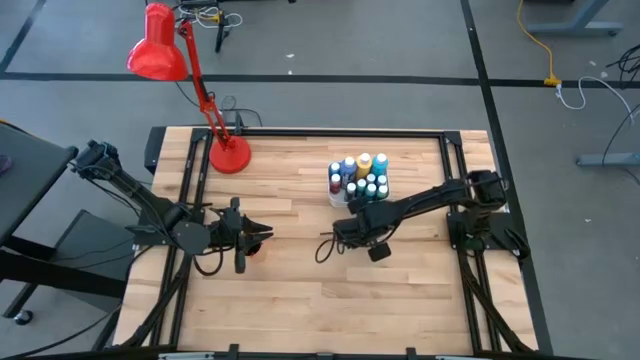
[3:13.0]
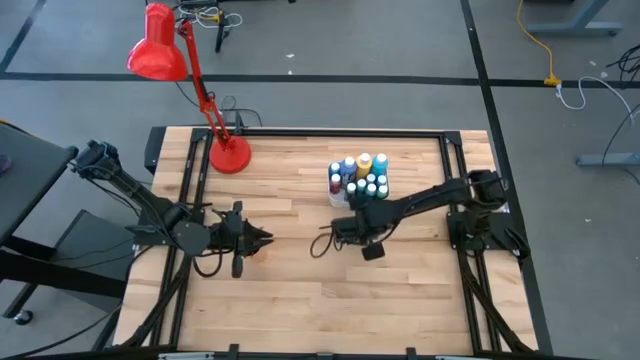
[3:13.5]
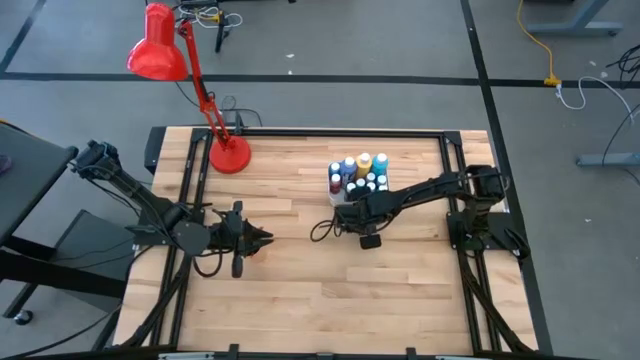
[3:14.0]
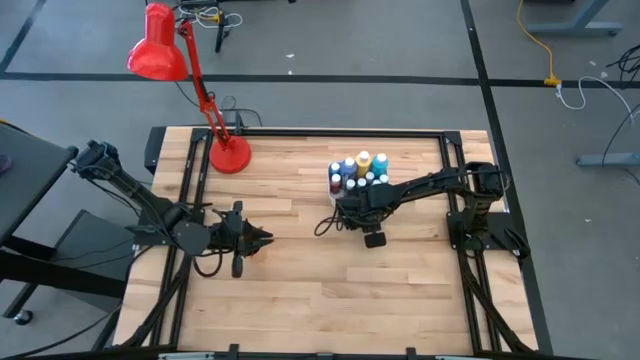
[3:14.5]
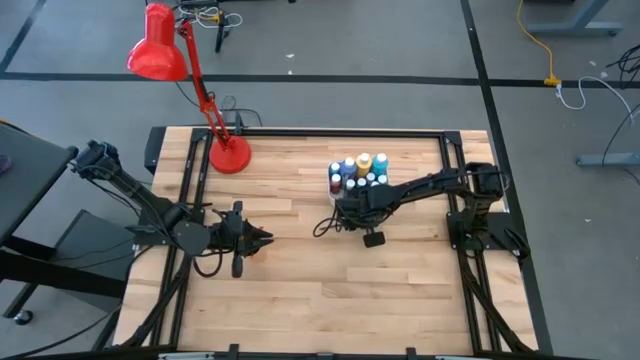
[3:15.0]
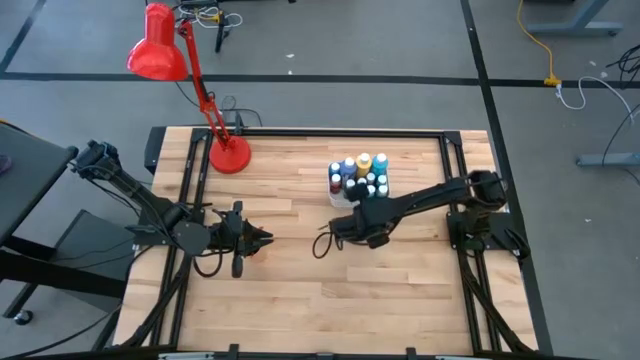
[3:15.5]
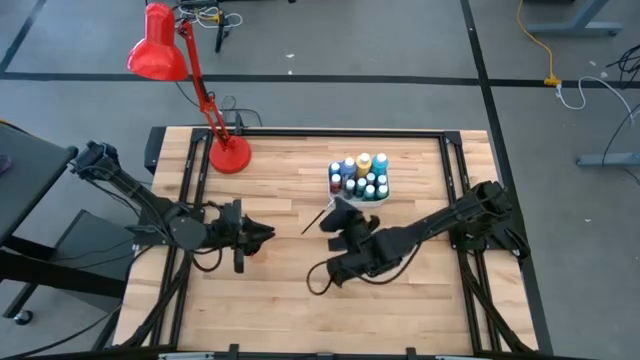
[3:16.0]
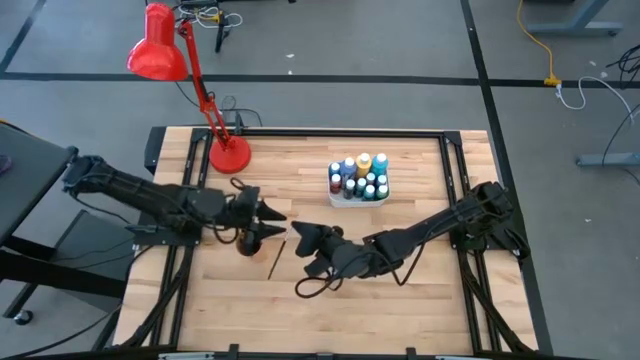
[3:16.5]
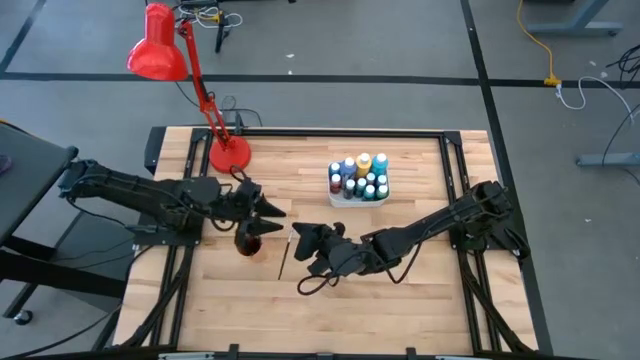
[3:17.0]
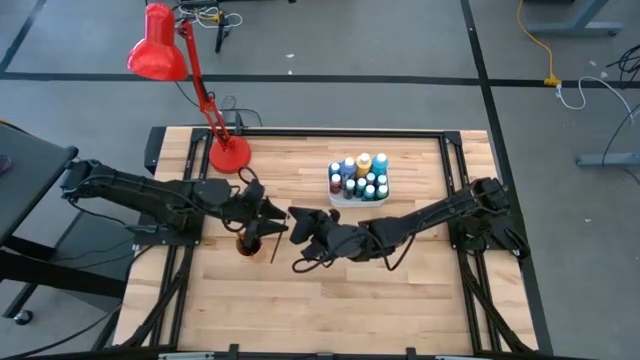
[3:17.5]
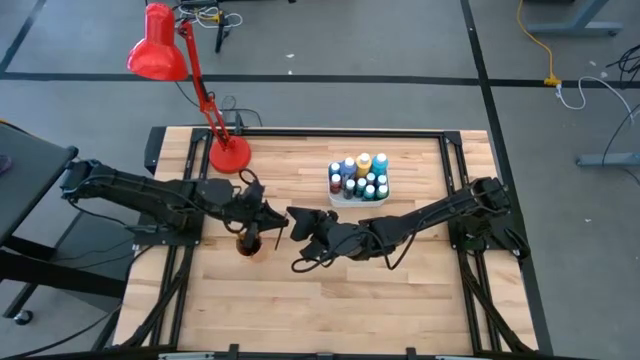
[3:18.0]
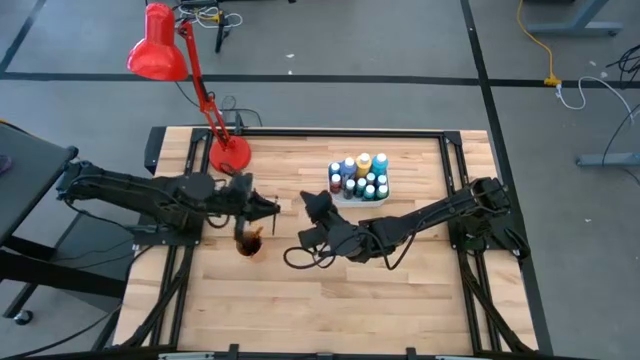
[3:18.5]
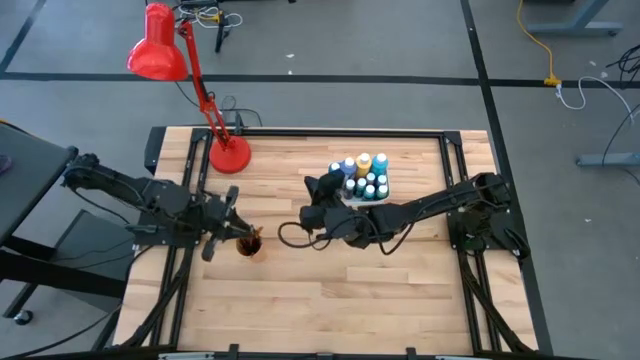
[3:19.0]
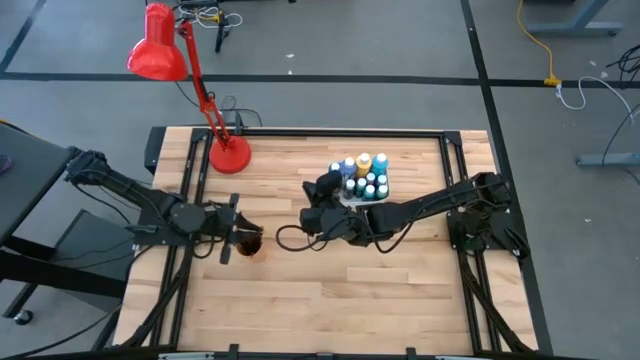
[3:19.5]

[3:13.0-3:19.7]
Task: Pick & Place Paint Supplies
Put the silver paint brush into the orange cup

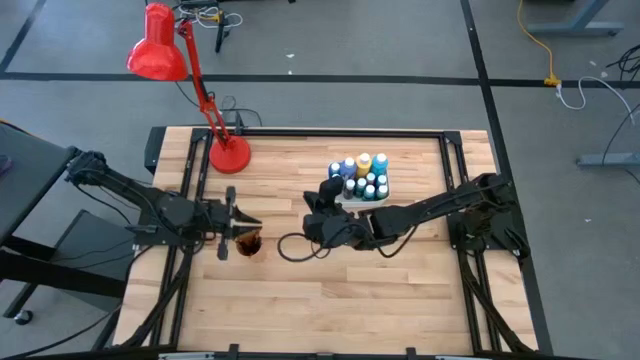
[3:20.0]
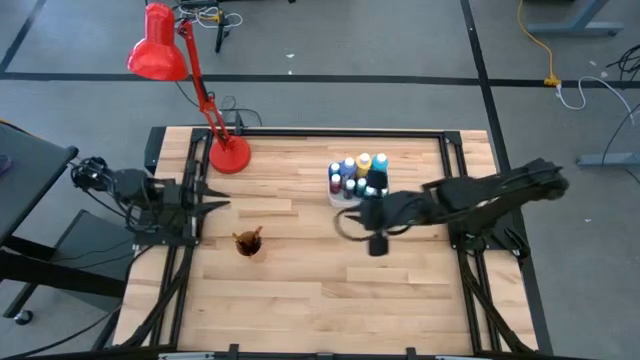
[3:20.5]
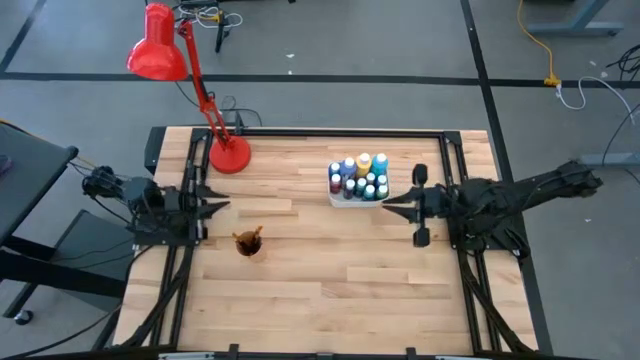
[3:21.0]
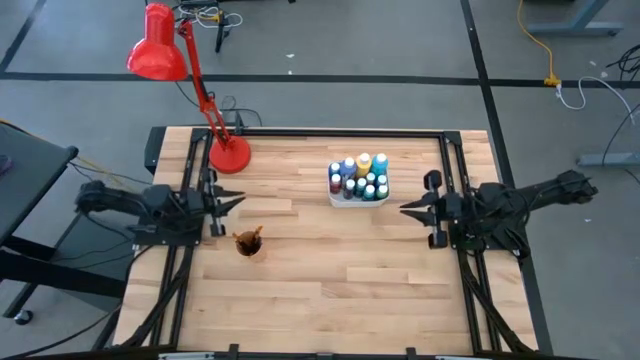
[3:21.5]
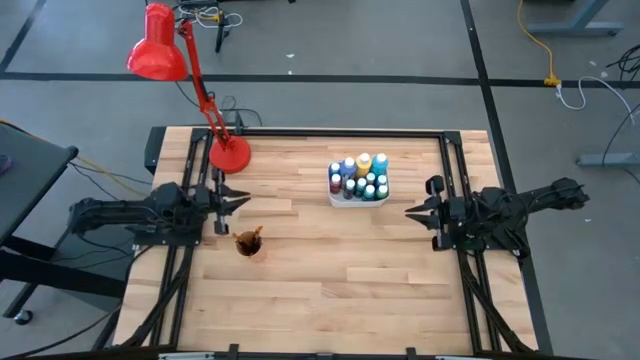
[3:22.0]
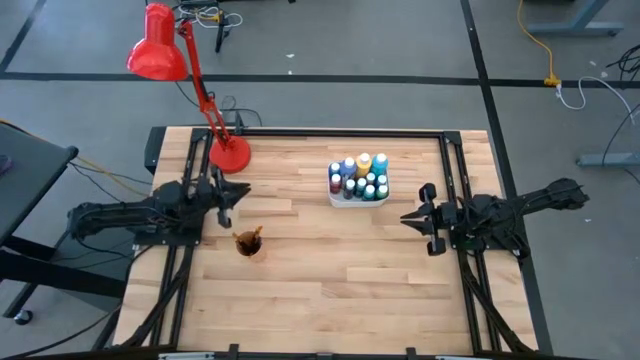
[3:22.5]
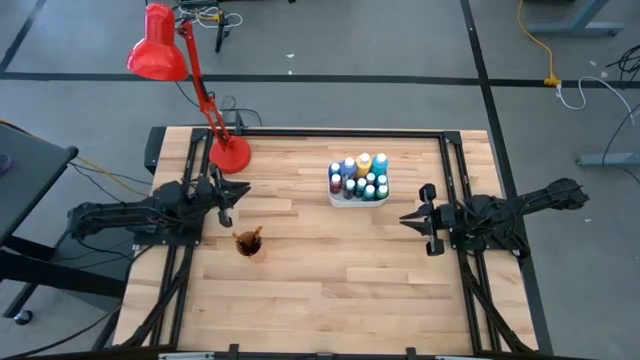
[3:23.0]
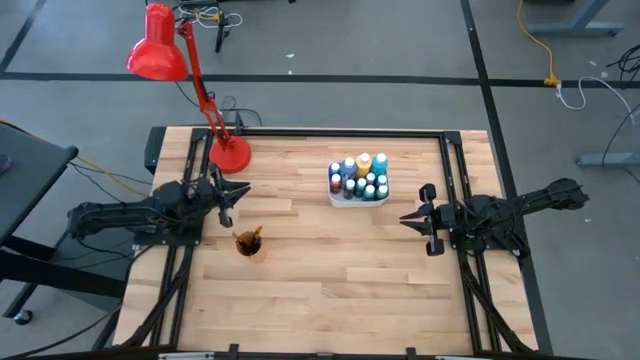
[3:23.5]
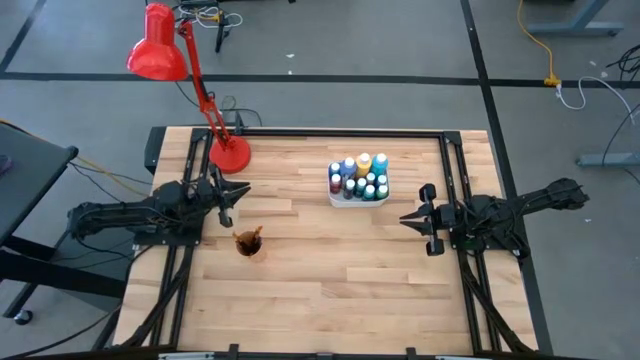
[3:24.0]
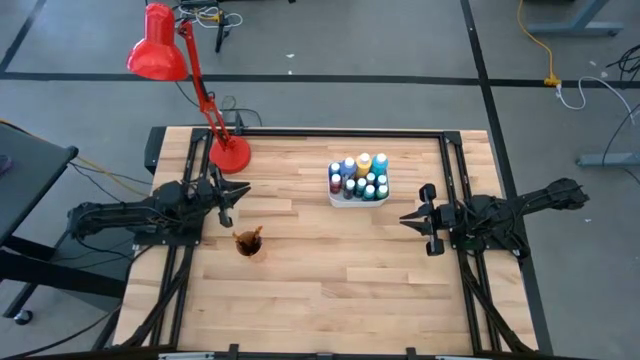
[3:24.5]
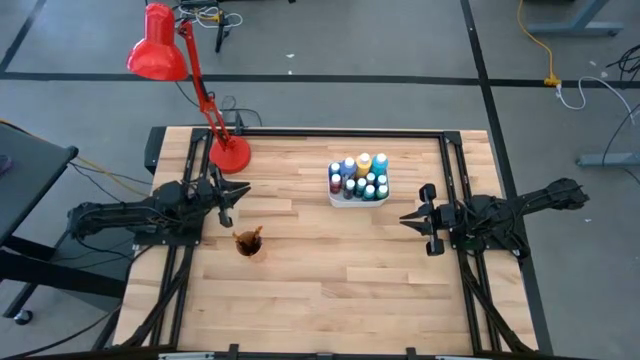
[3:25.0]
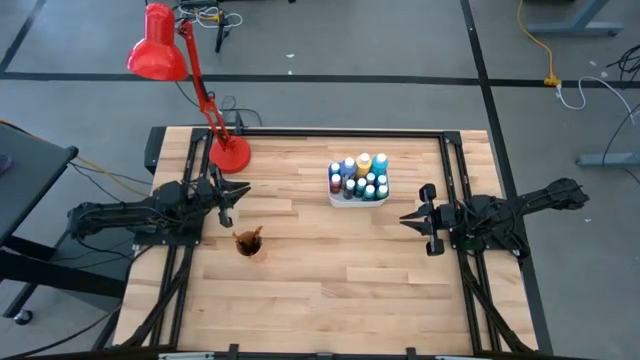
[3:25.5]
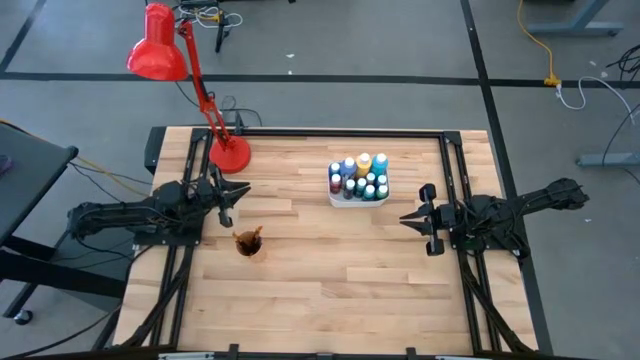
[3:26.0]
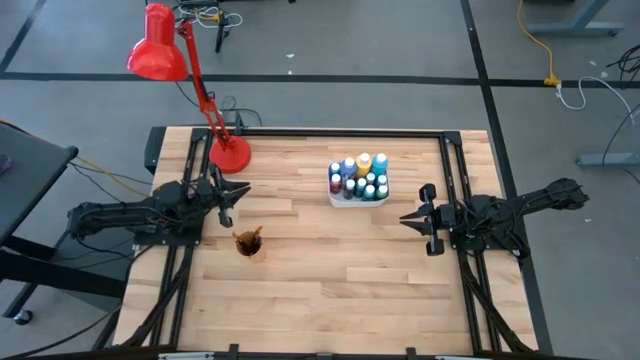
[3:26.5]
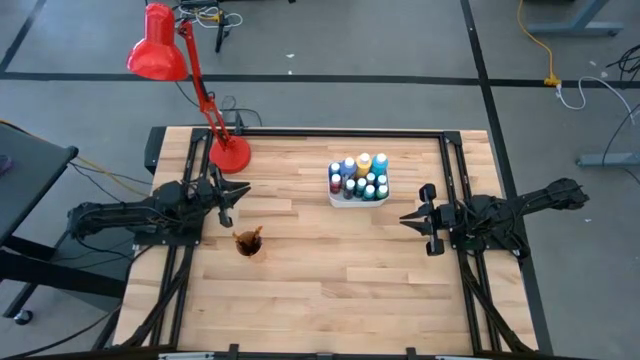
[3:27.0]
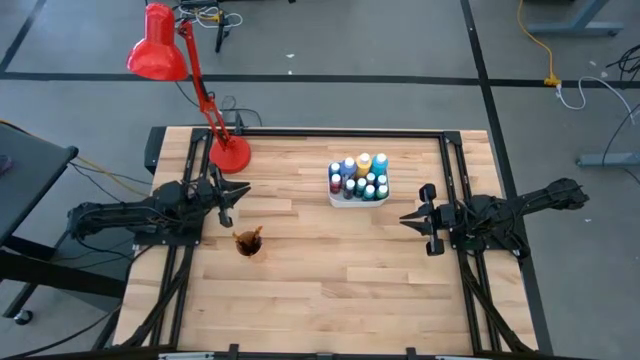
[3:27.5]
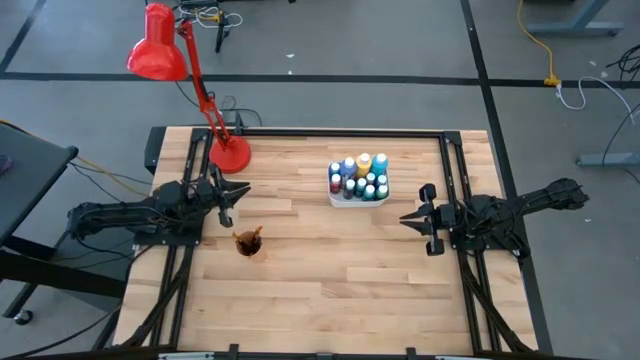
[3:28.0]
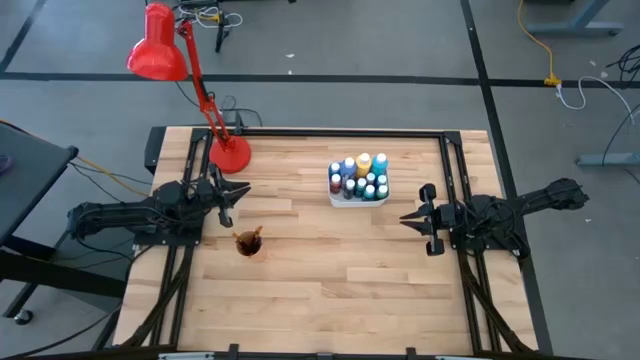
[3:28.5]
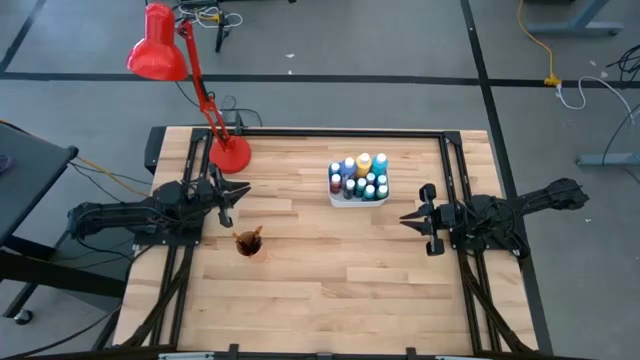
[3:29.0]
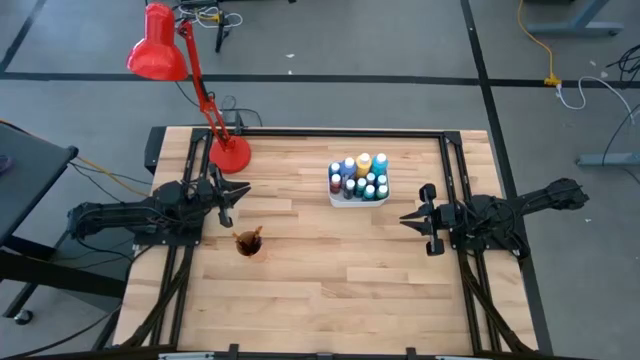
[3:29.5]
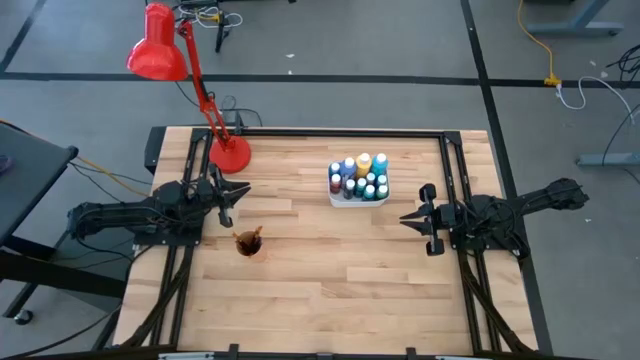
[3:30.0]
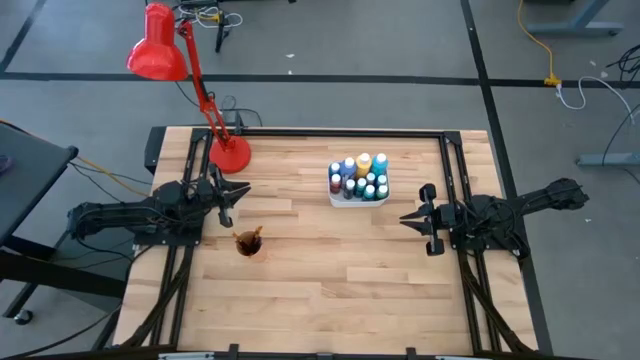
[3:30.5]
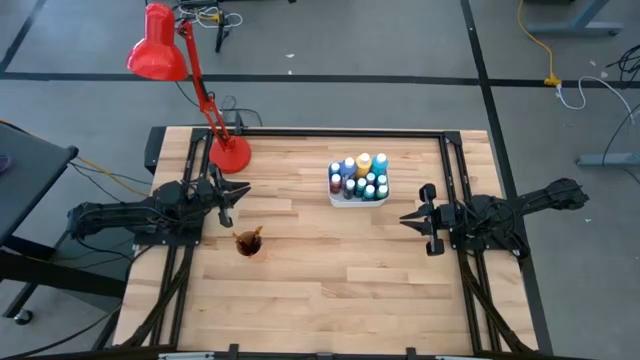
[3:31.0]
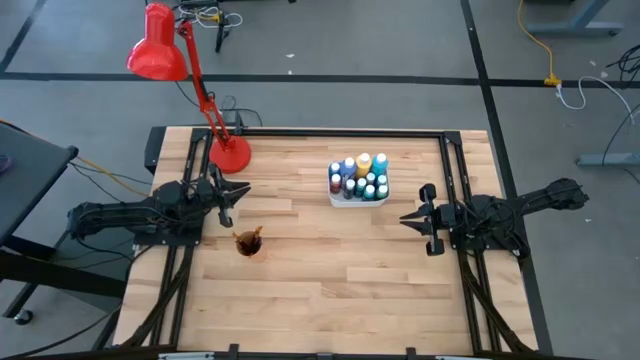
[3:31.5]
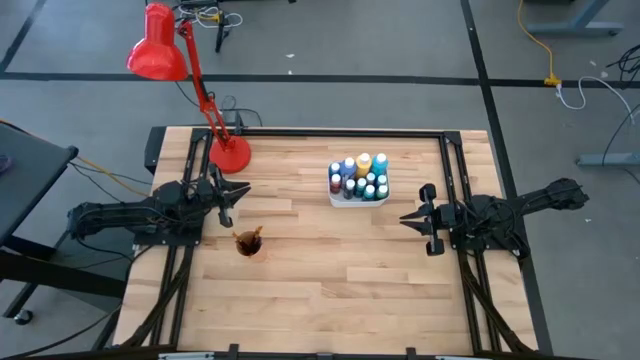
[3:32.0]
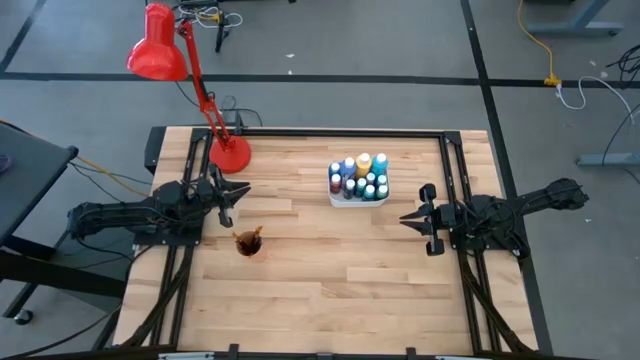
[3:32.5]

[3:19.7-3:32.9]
Return to Home Position

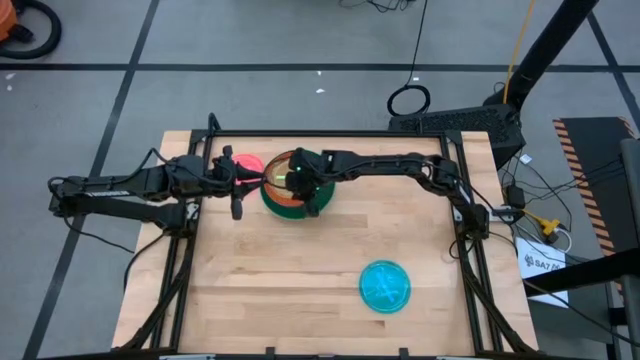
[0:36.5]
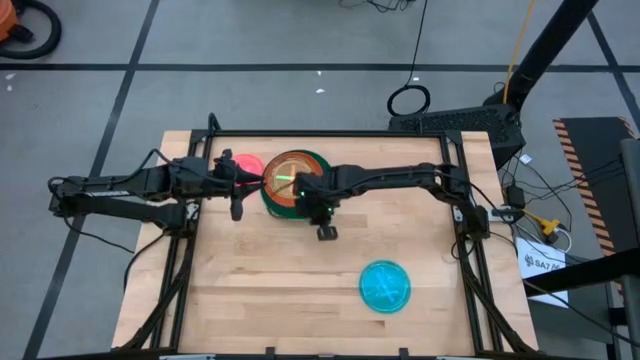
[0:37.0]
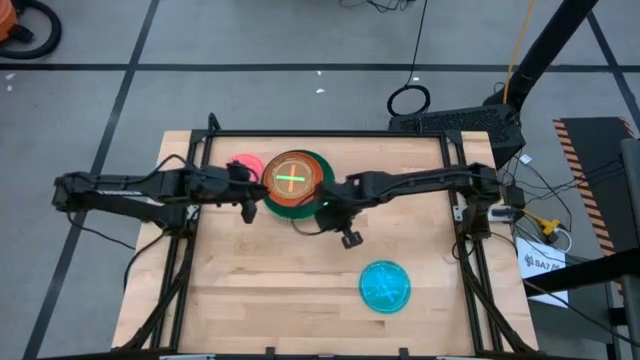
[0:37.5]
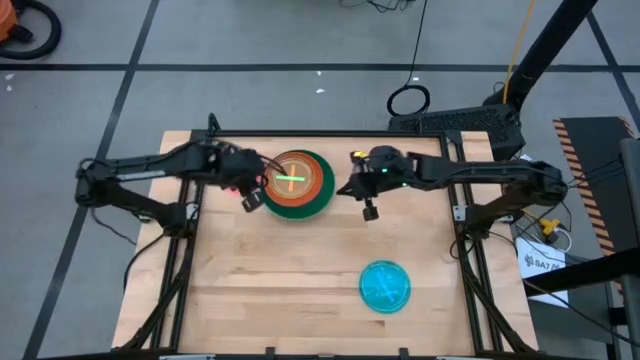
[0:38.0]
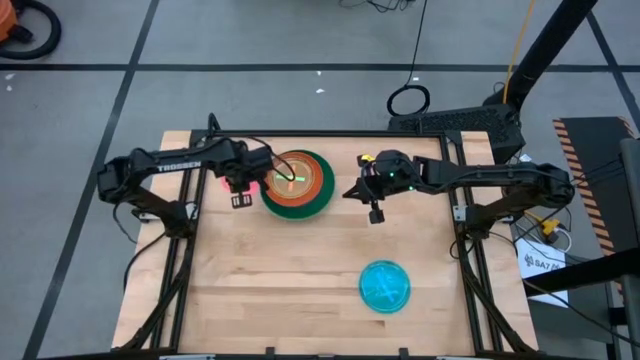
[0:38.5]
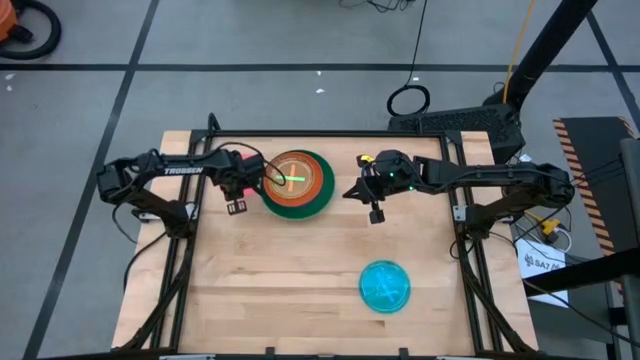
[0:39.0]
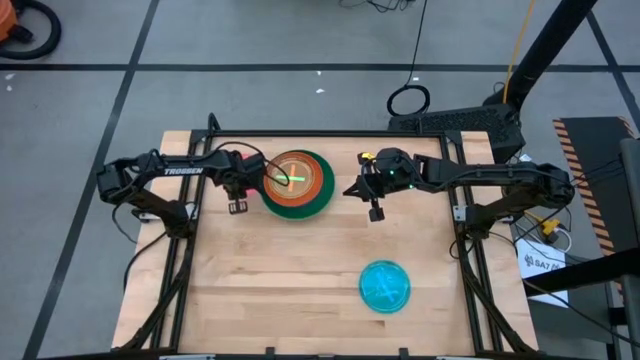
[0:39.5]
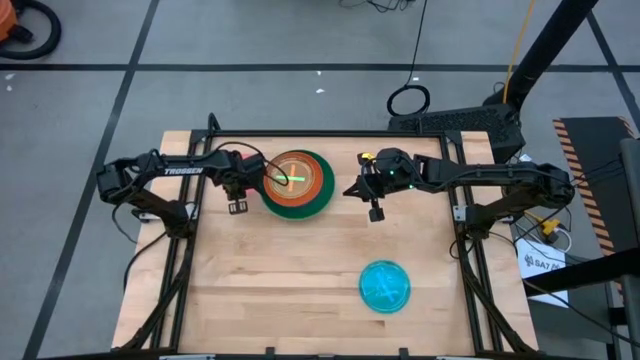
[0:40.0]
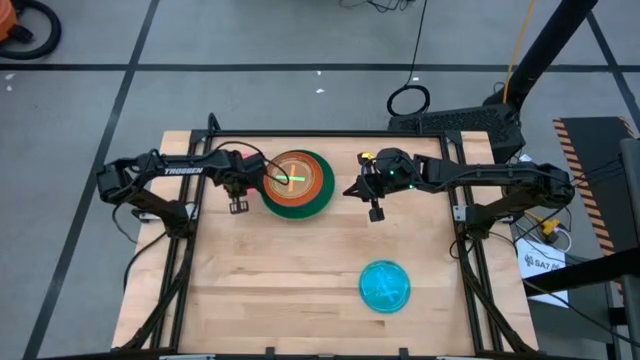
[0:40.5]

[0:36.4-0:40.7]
Task: Stack plastic plates
Stack the pink plate on top of the light green plate
